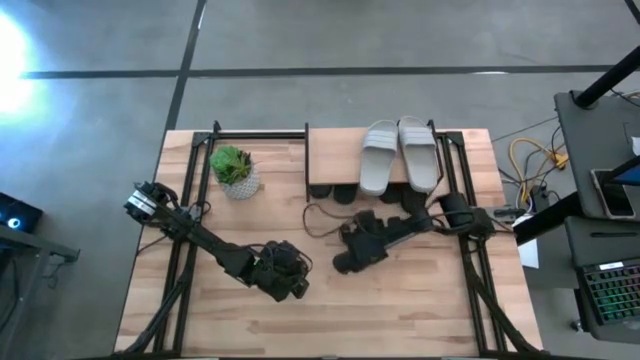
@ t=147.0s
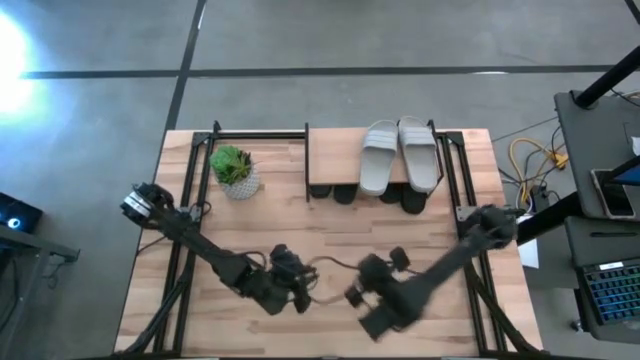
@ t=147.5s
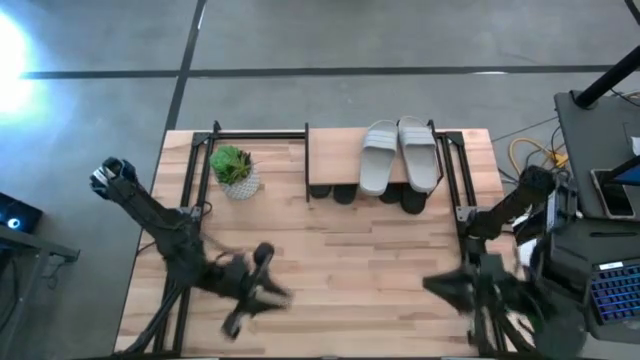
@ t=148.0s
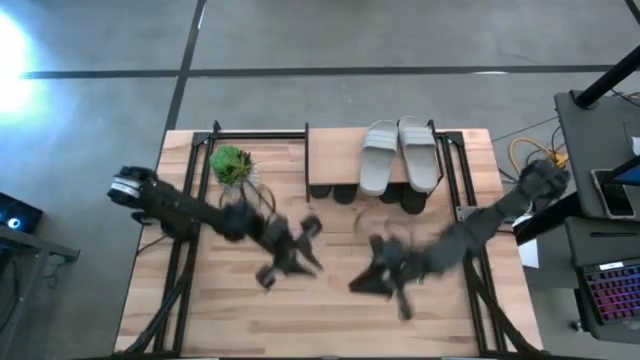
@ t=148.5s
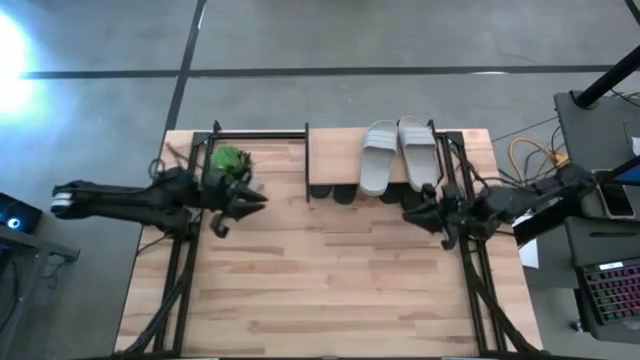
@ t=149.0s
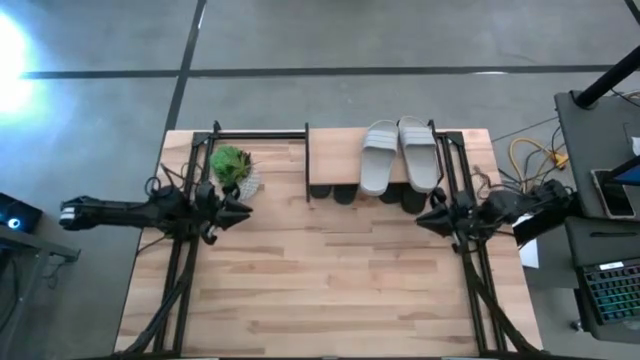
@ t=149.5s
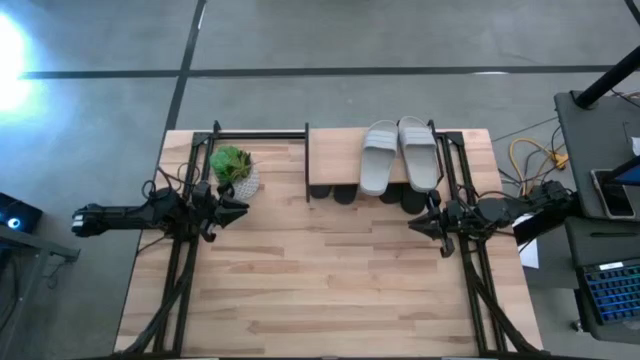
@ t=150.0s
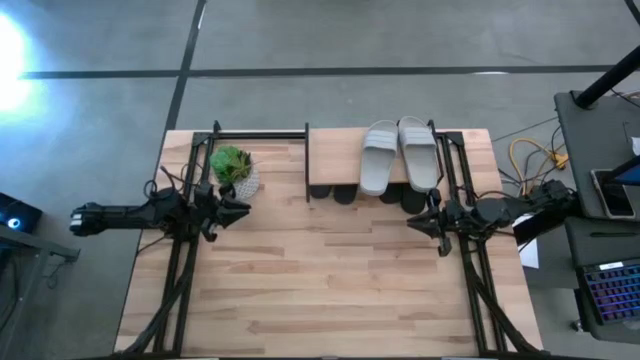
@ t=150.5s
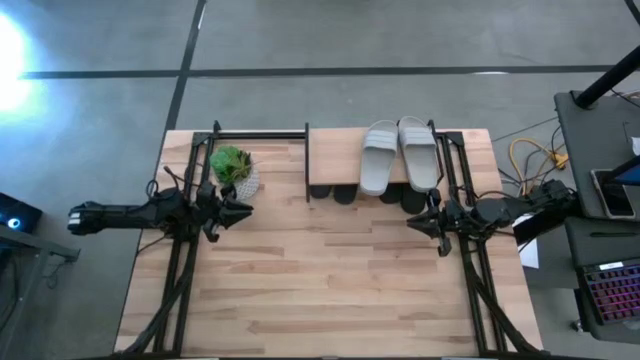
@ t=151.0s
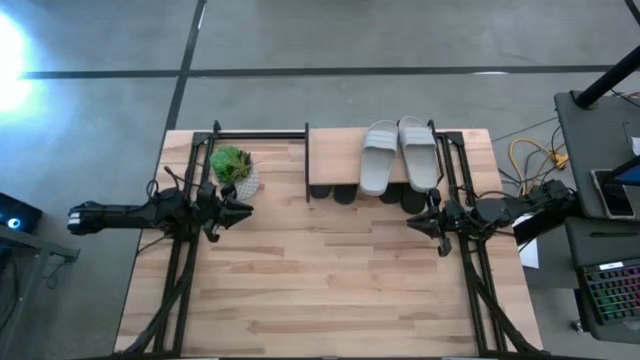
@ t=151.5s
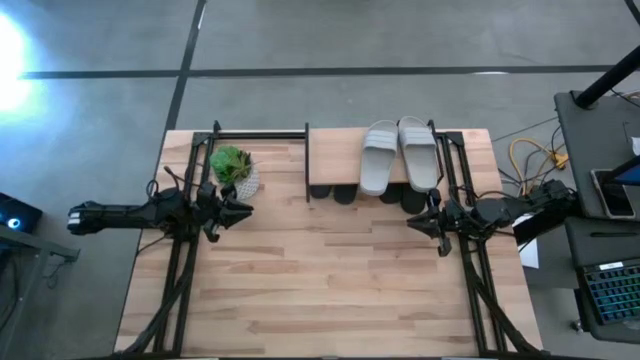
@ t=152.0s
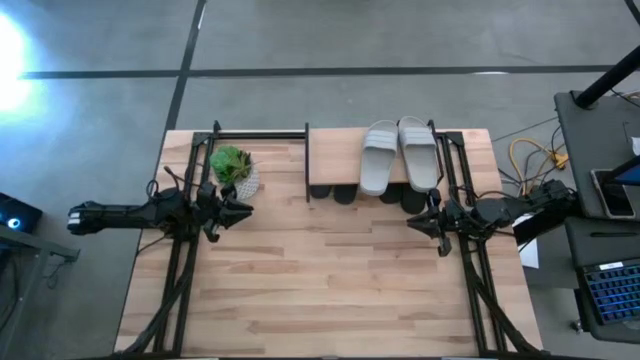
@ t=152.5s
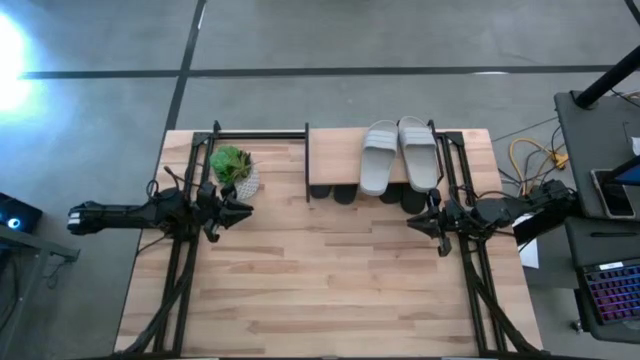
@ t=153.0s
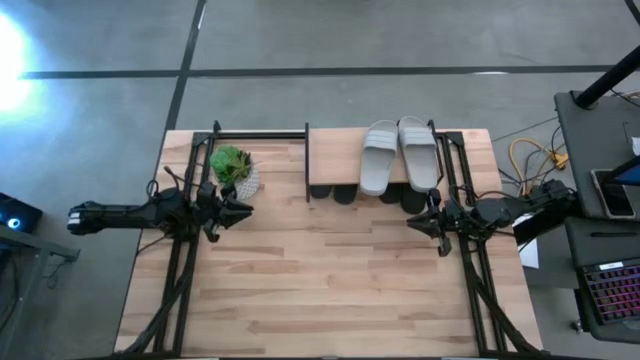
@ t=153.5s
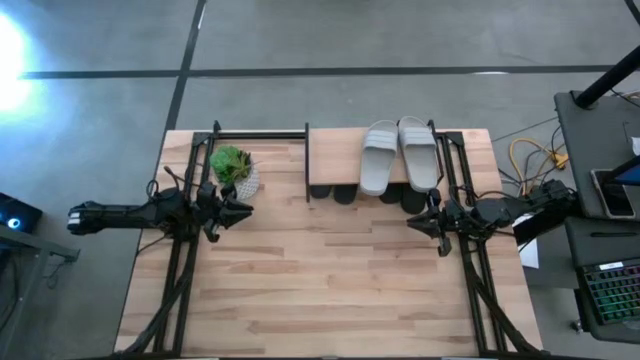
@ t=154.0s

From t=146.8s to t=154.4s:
Task: Pick and place slides into the shelf
Return to Home Position

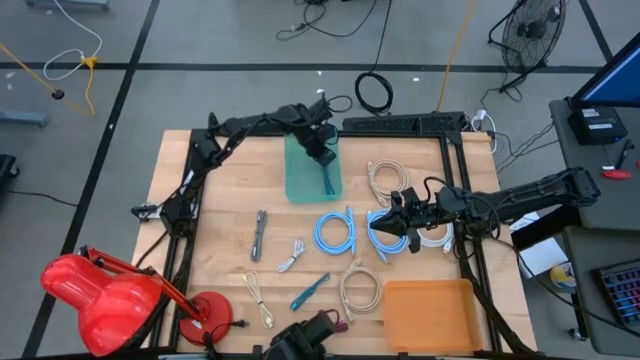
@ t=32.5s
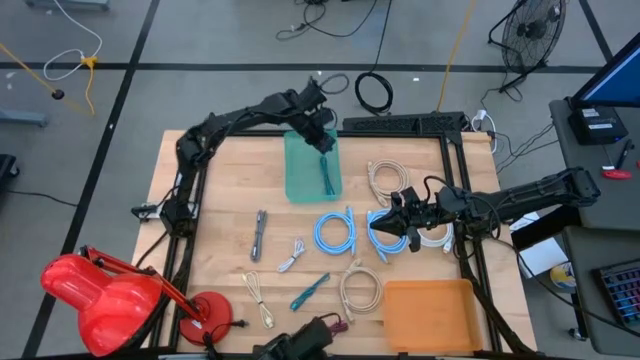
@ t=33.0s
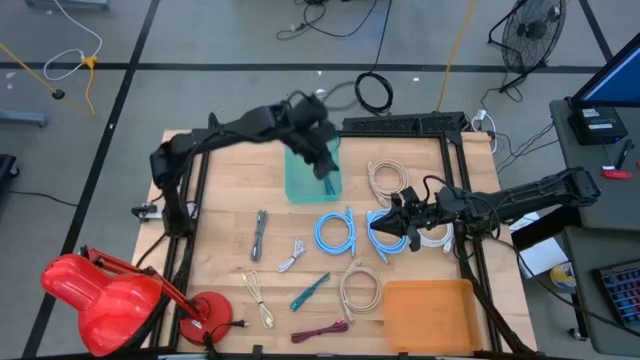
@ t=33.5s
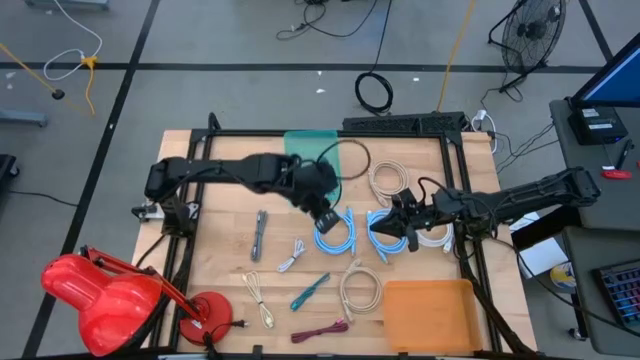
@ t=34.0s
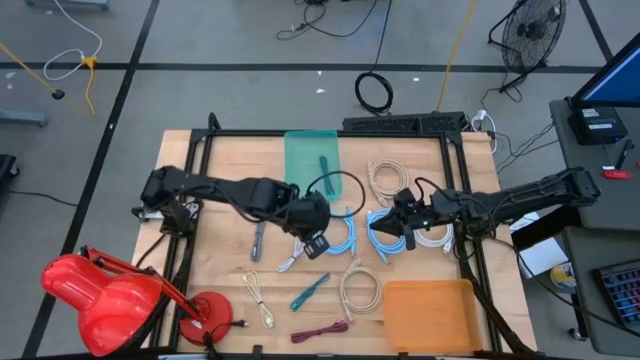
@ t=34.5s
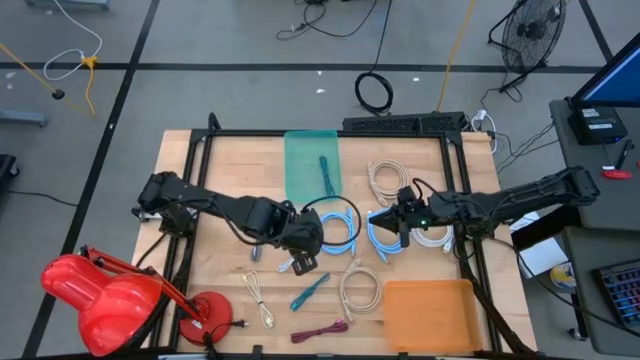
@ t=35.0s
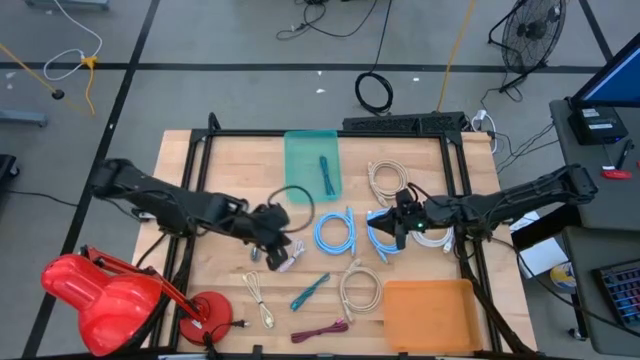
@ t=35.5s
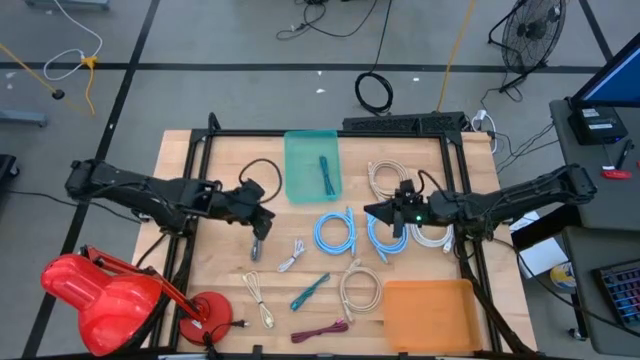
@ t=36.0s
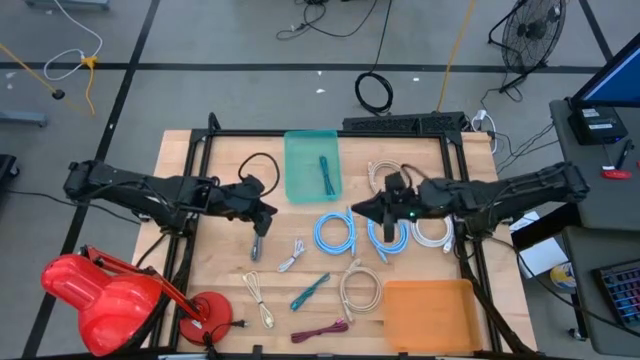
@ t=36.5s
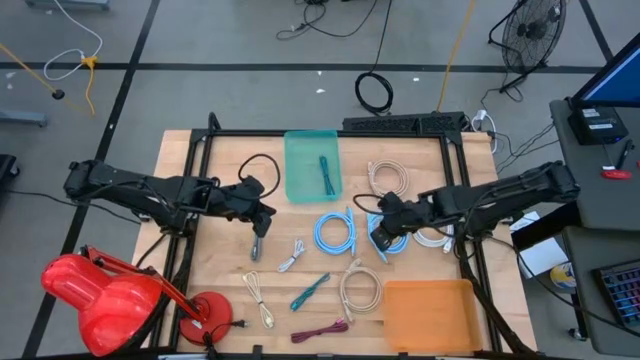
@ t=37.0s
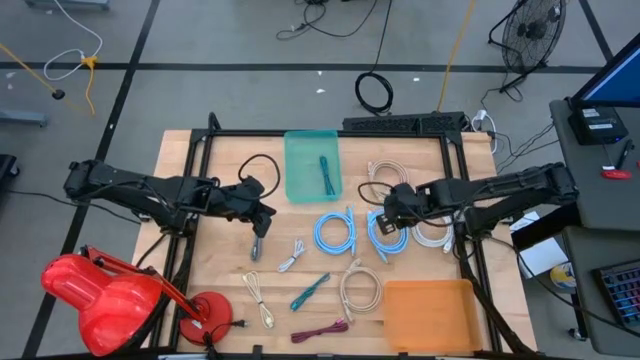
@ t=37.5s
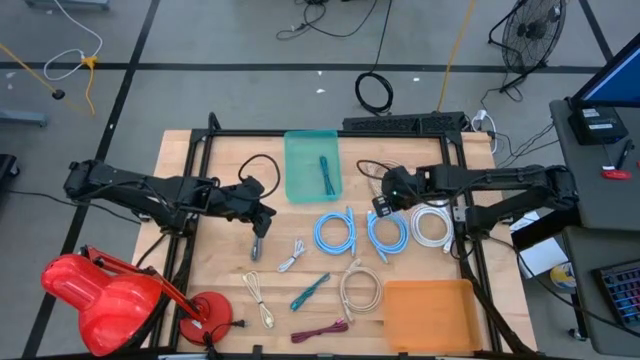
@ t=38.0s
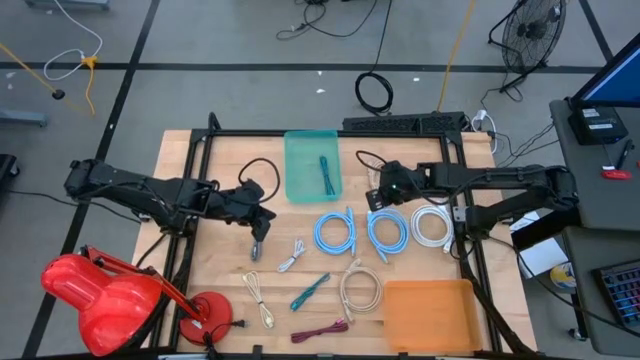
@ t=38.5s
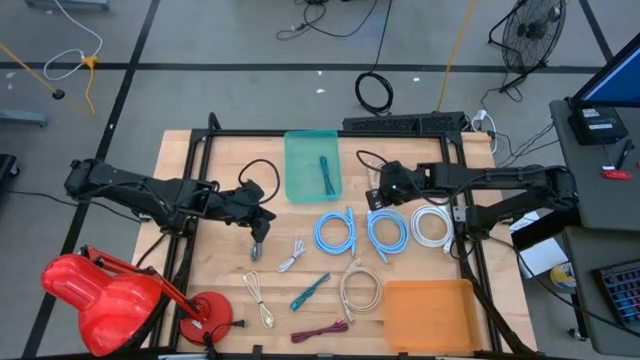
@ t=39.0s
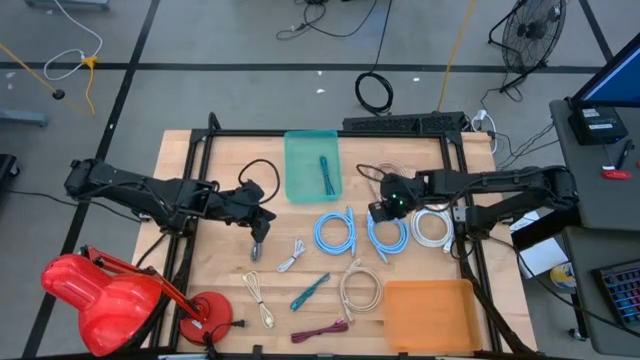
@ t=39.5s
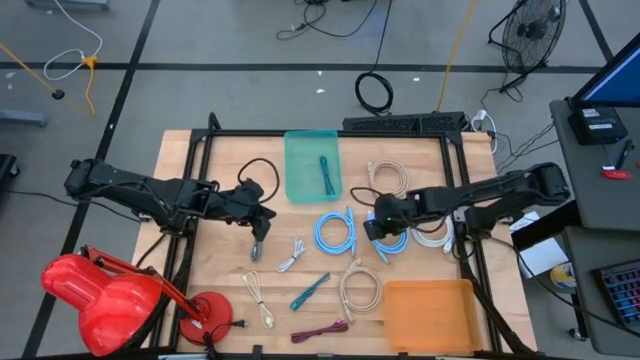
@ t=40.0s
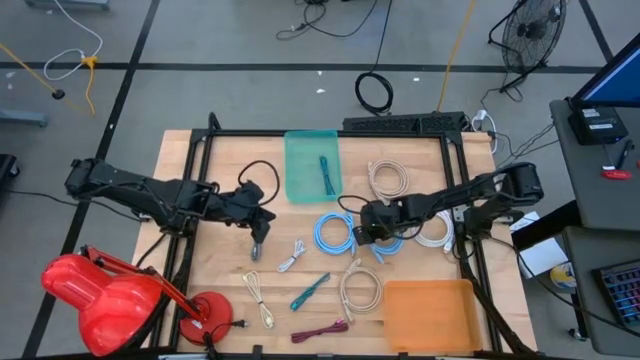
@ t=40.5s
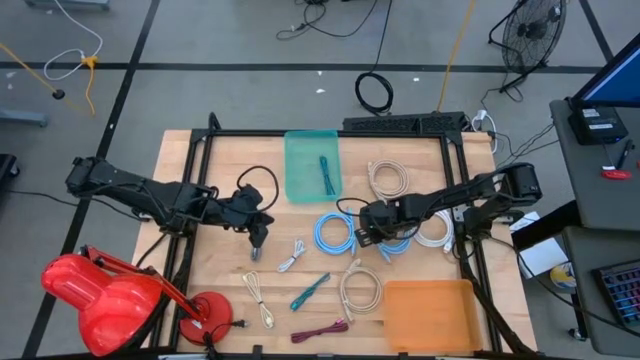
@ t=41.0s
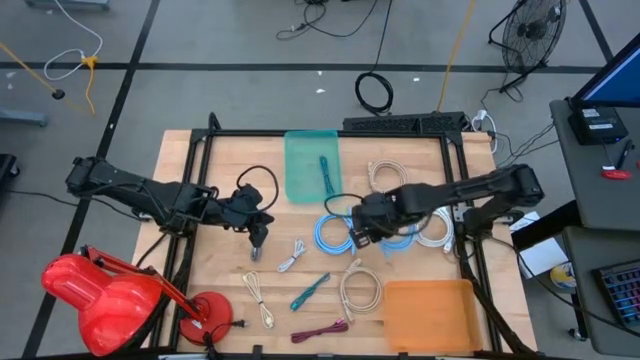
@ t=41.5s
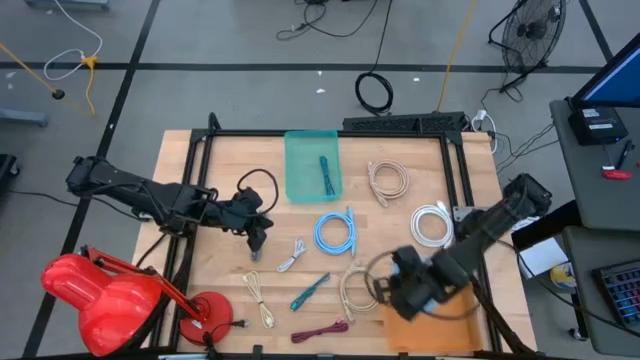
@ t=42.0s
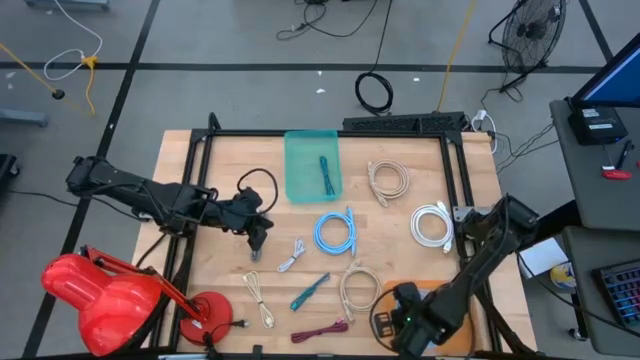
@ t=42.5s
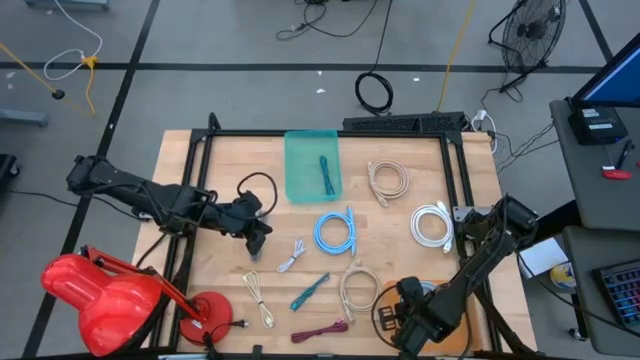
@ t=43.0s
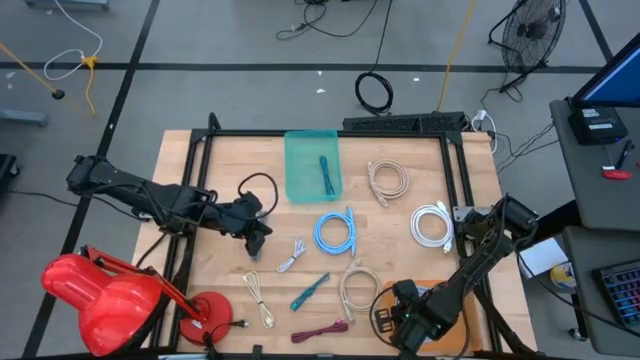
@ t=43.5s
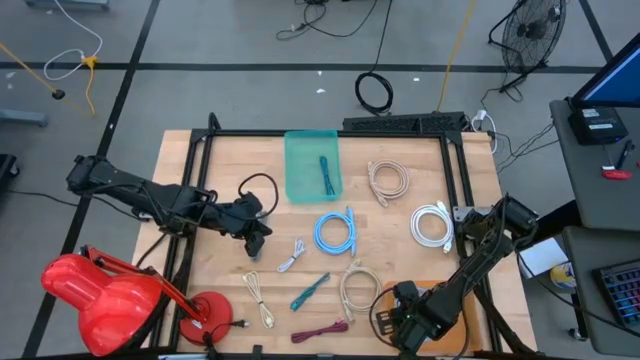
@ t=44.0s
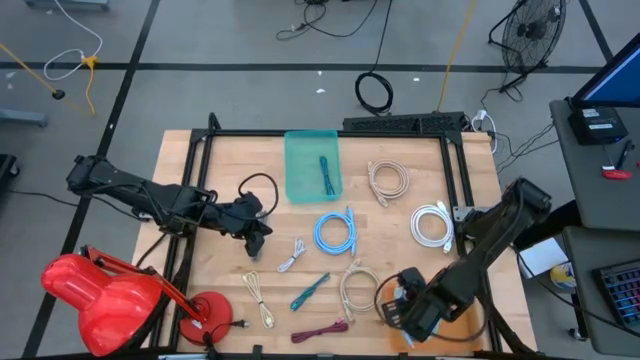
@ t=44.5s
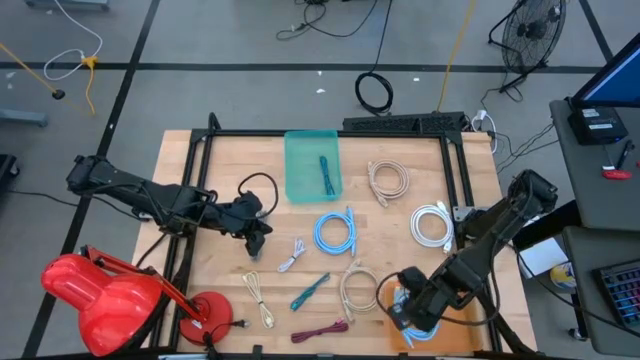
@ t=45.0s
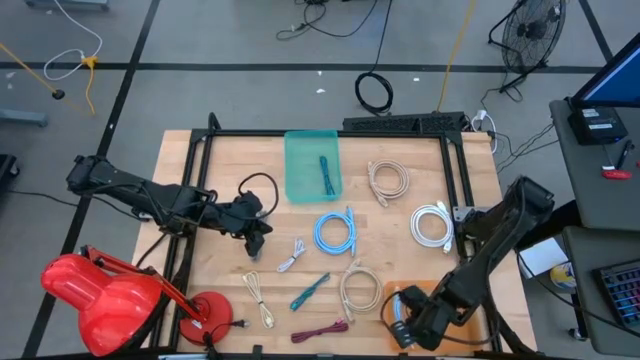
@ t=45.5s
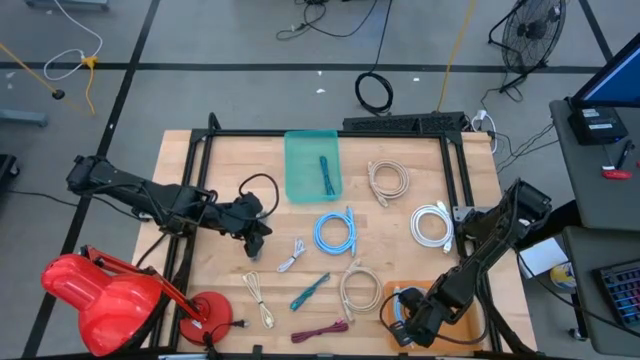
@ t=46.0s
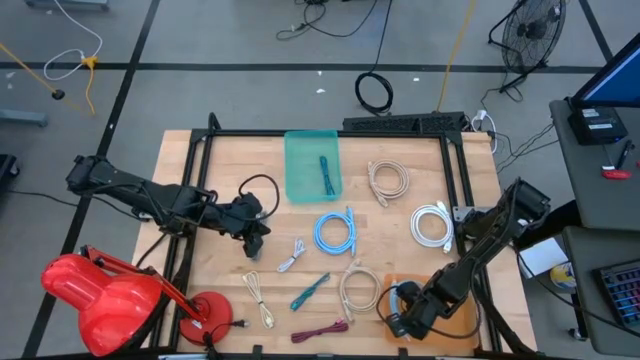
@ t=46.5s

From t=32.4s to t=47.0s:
Task: Pick & Place USB Port
Put the right light blue charger cable into the orange bin
